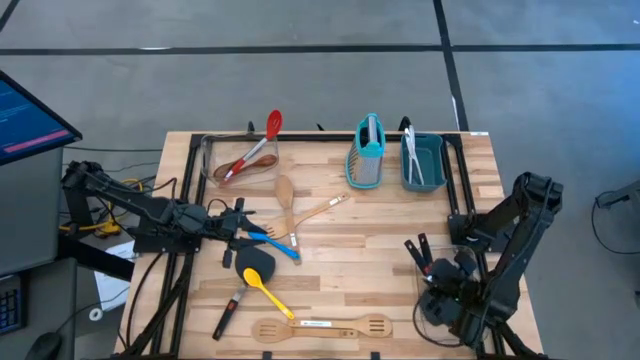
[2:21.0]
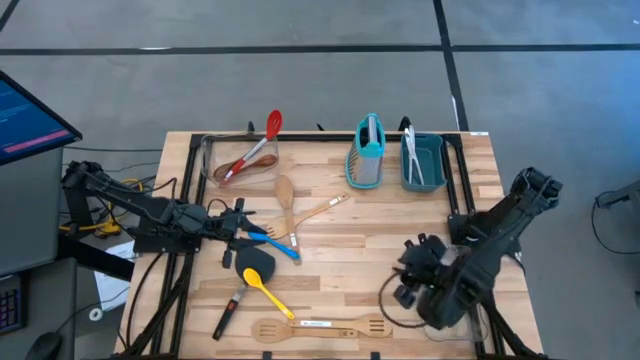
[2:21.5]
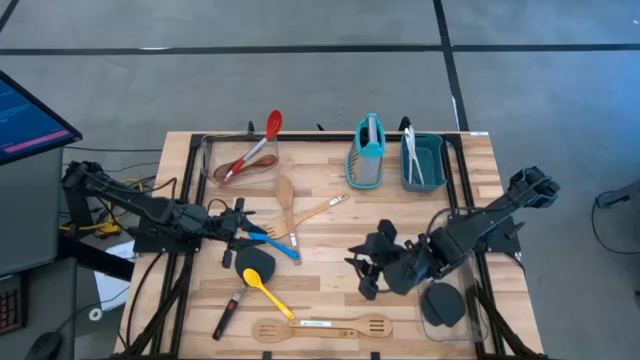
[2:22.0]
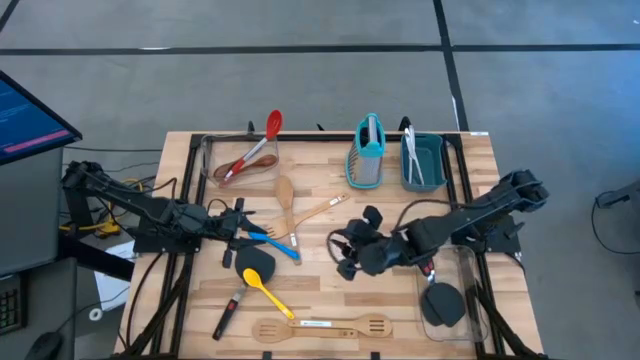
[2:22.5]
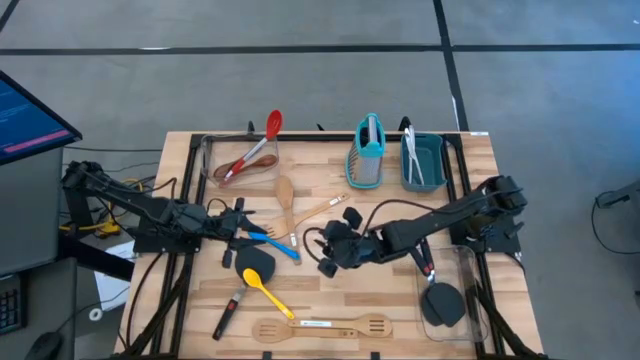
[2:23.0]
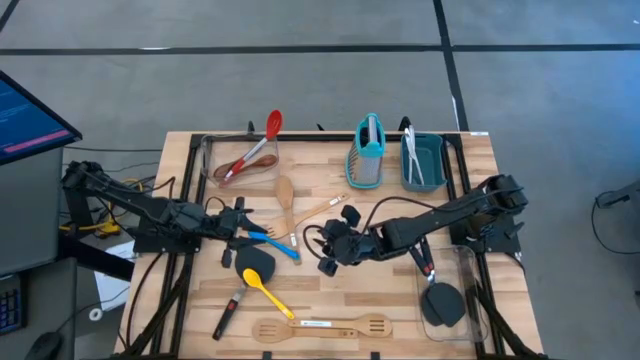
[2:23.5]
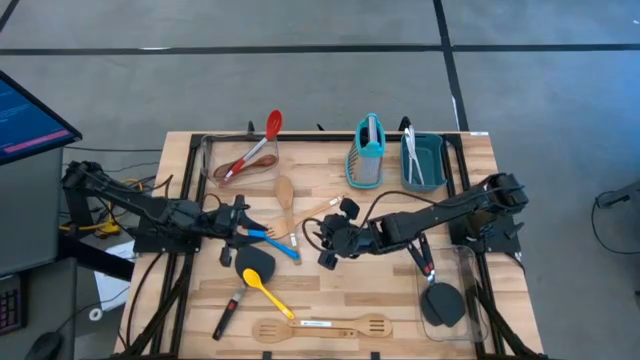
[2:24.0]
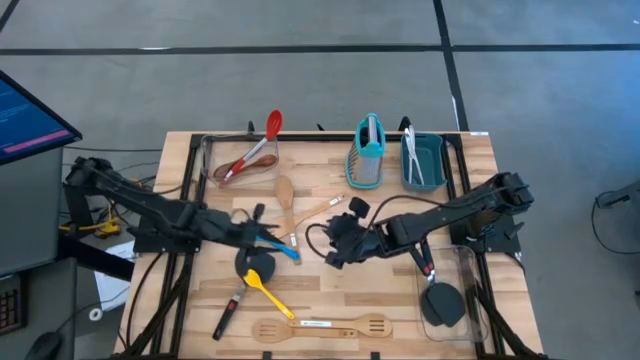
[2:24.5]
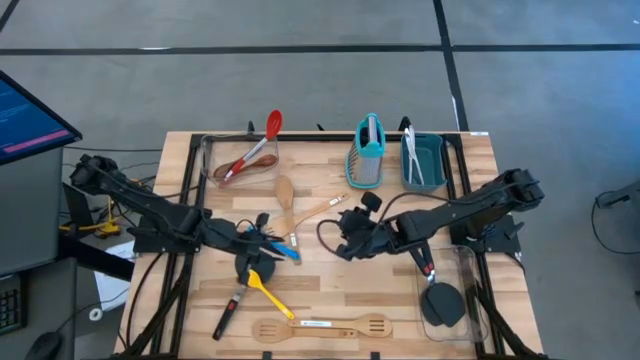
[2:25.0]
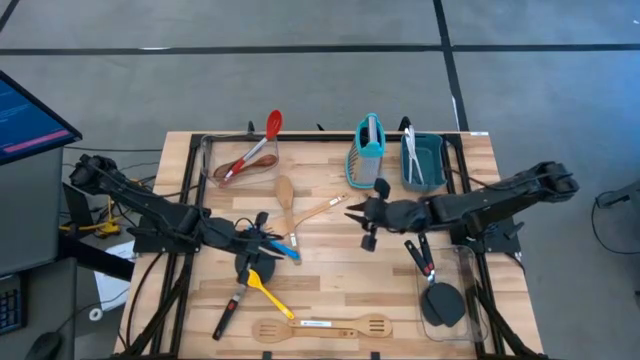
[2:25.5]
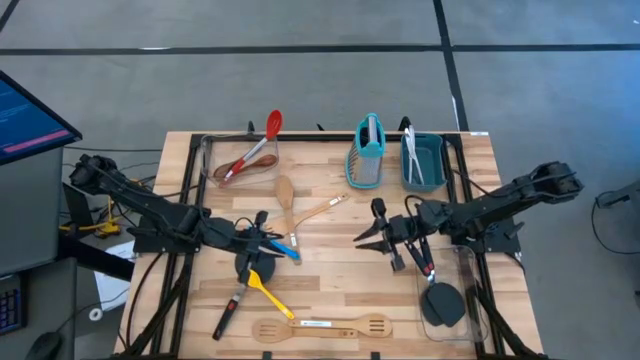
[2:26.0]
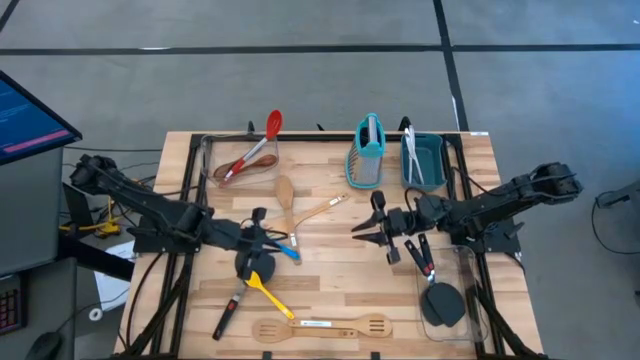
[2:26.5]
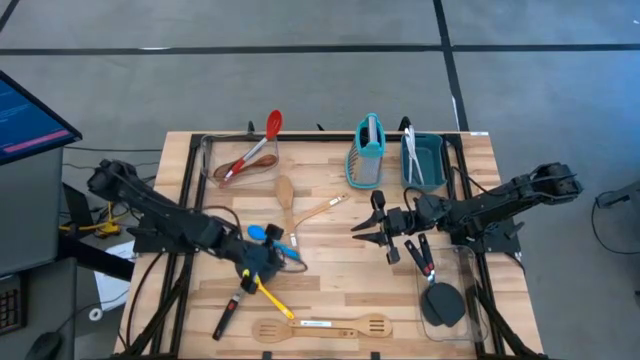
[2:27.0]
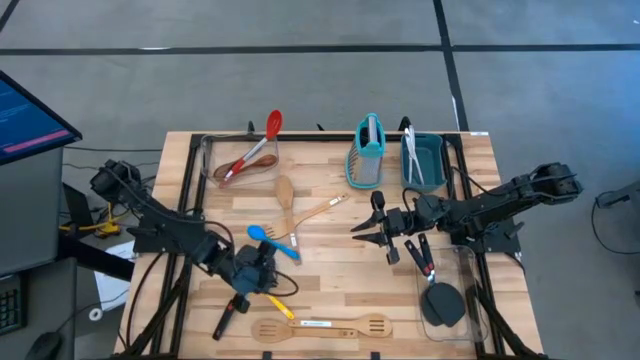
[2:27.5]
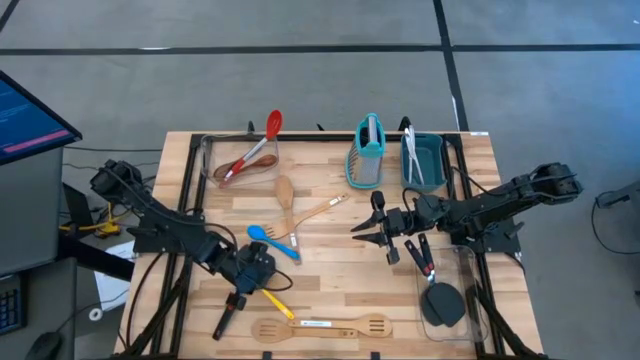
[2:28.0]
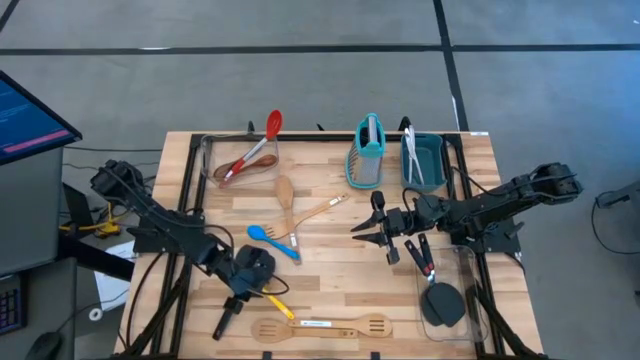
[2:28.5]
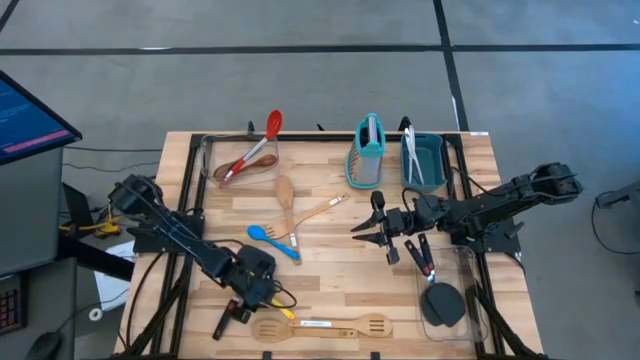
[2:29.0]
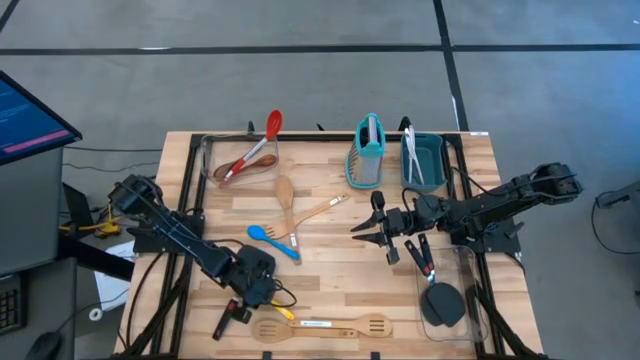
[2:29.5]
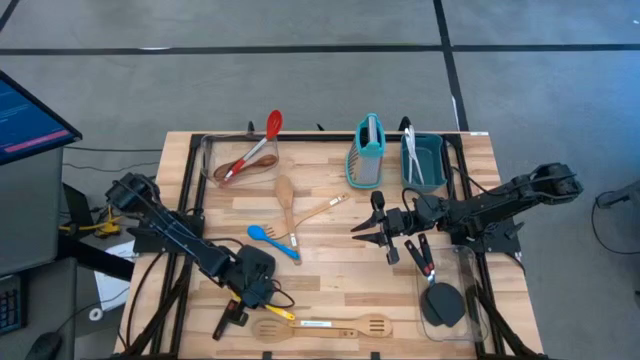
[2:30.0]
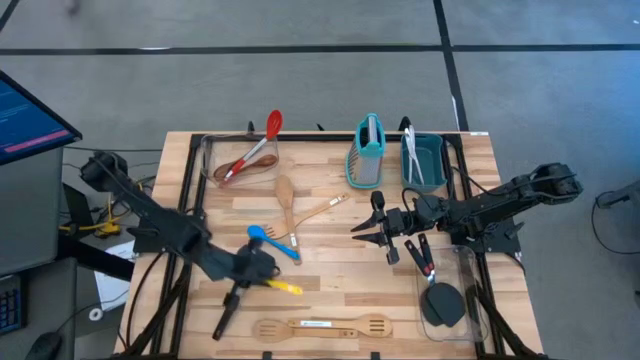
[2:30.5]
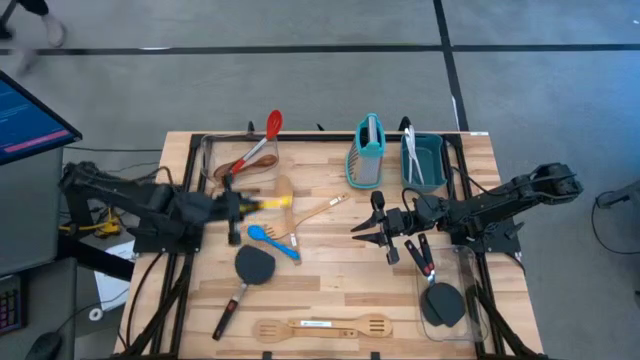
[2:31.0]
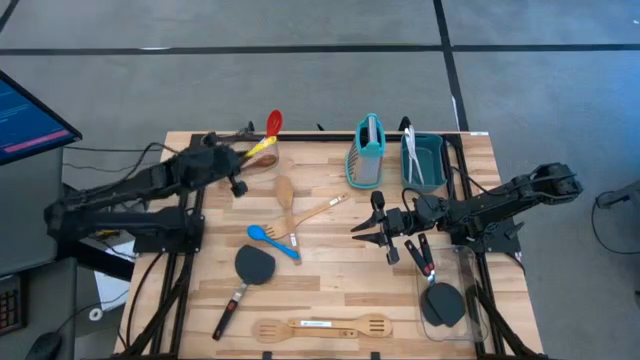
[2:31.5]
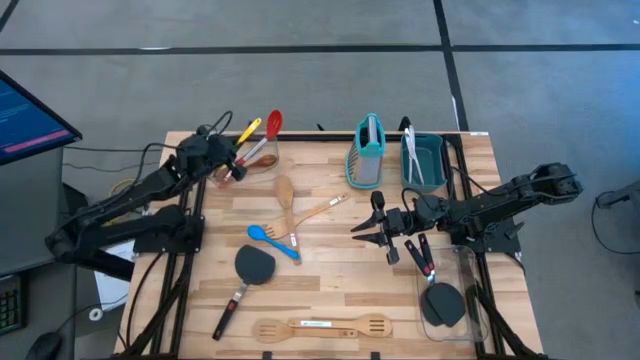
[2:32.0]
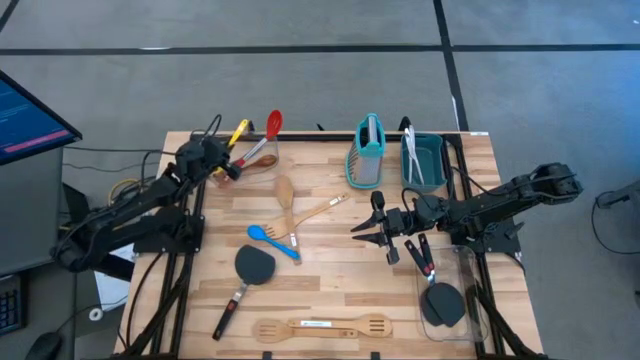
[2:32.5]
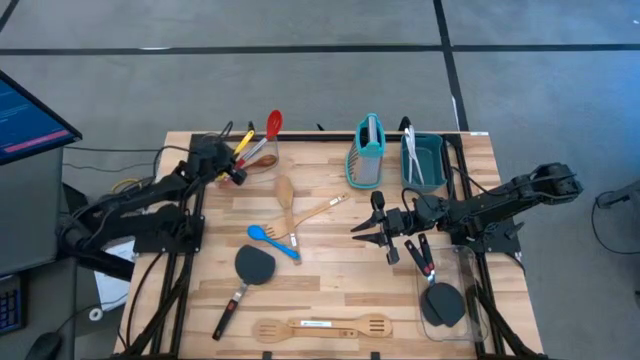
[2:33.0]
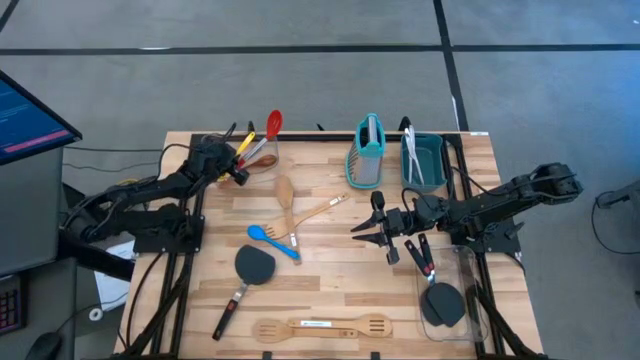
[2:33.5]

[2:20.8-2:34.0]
Task: Pick & Place Kitchen Items
Put the yellow spoon into the left transparent bin

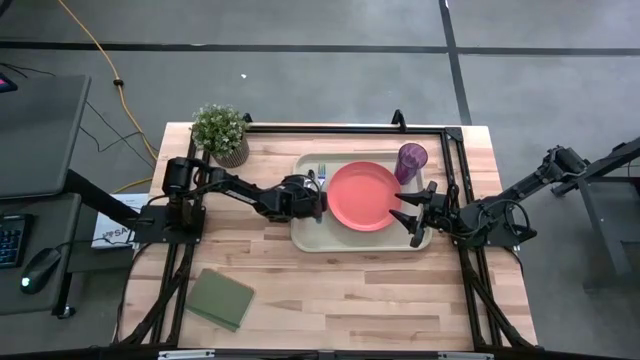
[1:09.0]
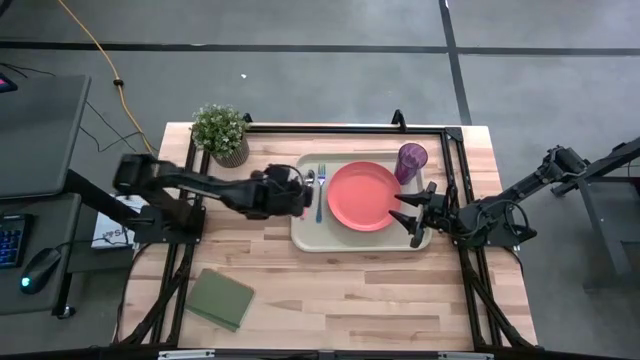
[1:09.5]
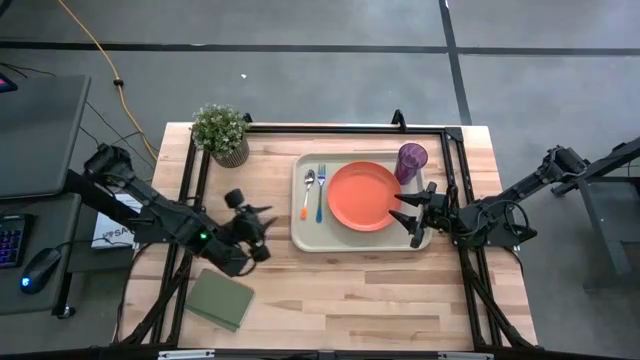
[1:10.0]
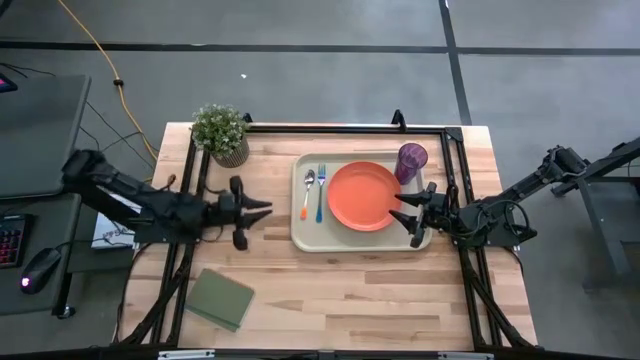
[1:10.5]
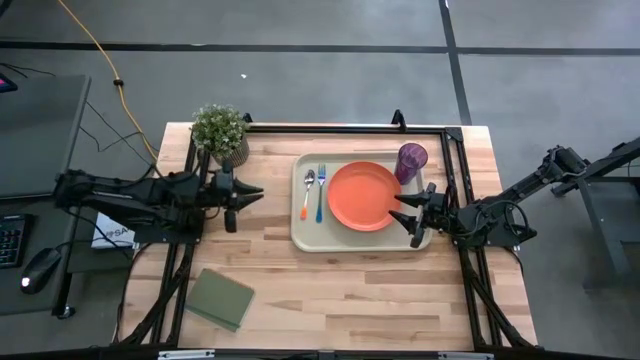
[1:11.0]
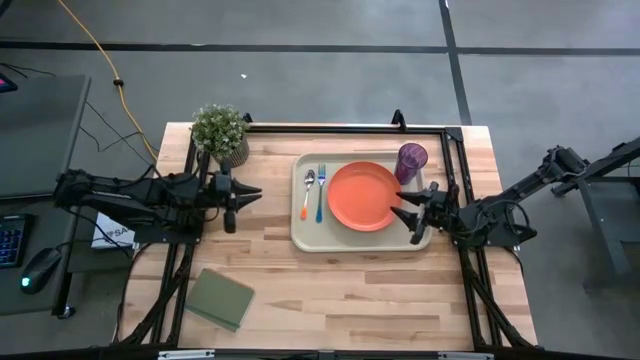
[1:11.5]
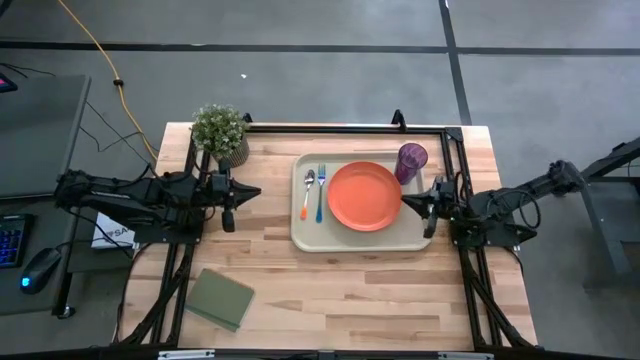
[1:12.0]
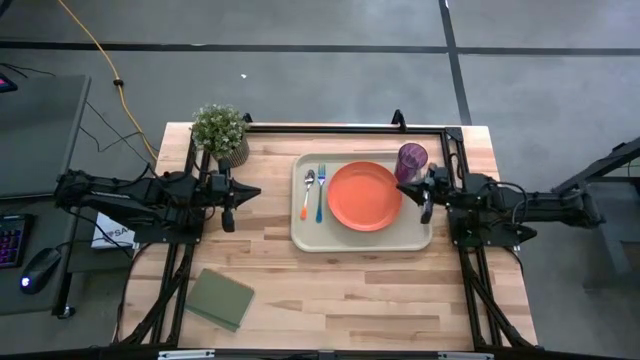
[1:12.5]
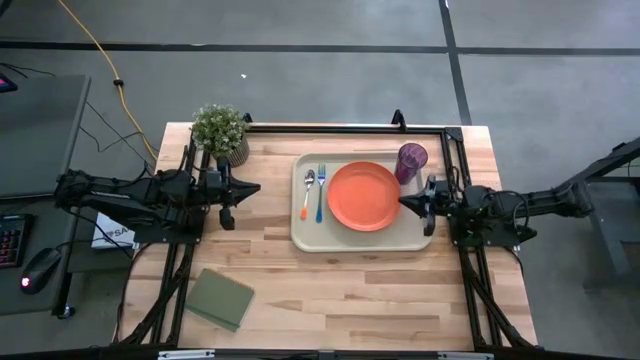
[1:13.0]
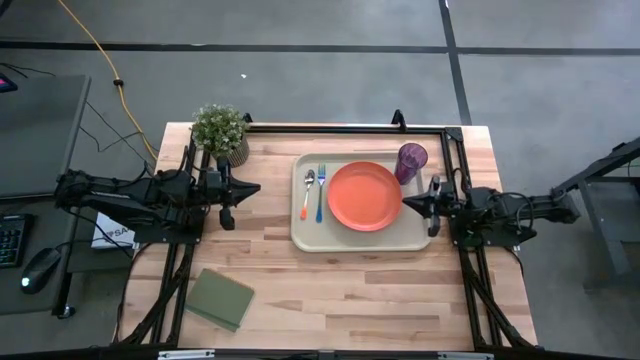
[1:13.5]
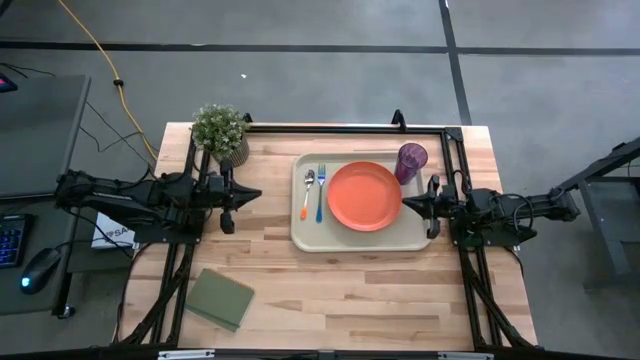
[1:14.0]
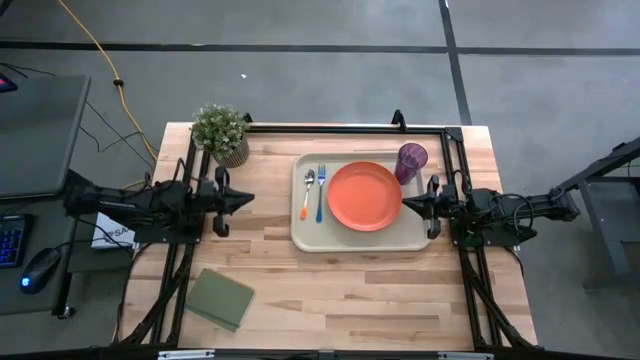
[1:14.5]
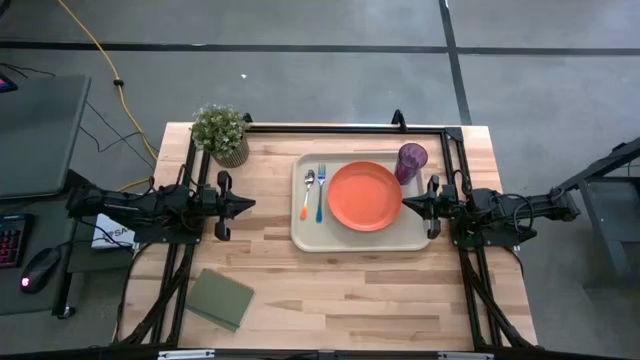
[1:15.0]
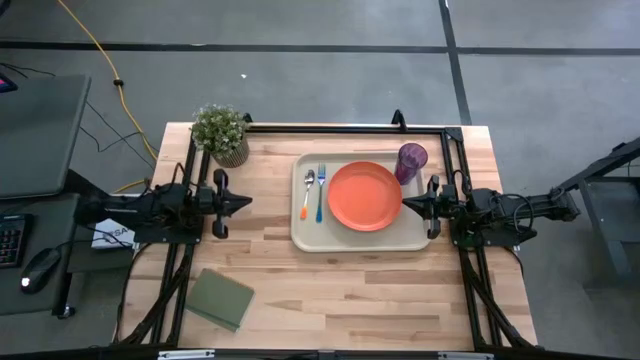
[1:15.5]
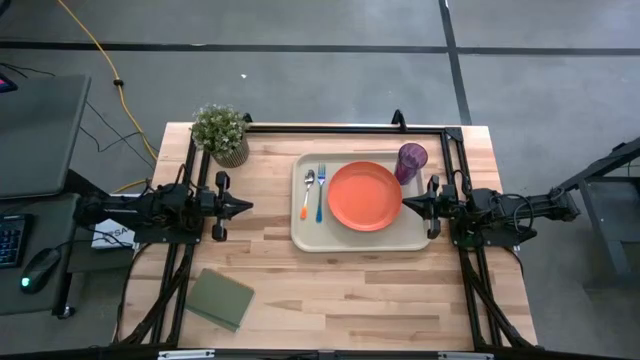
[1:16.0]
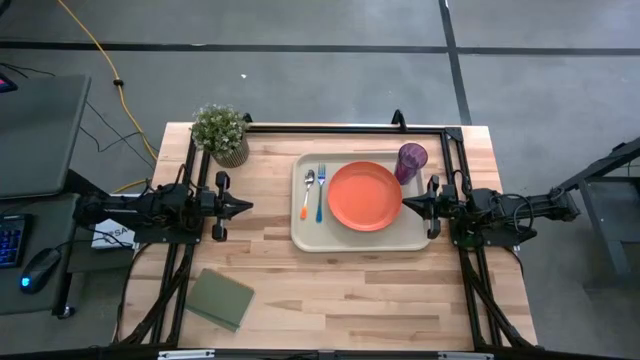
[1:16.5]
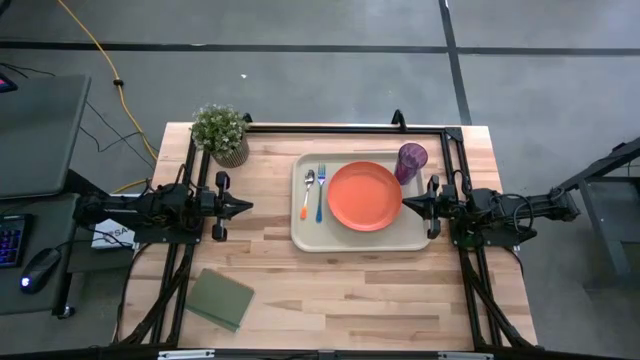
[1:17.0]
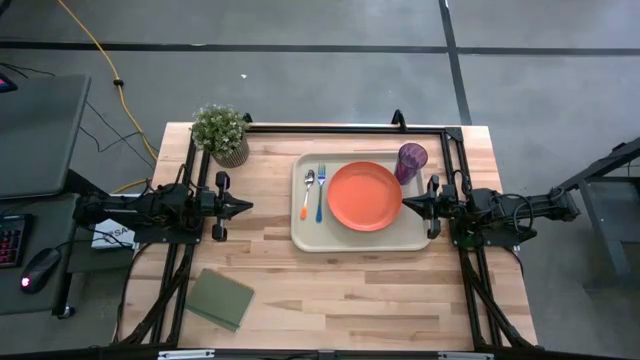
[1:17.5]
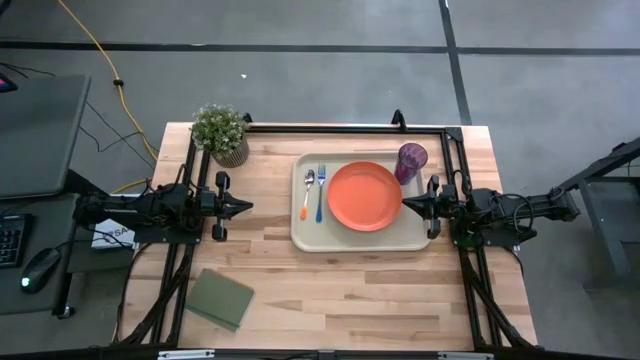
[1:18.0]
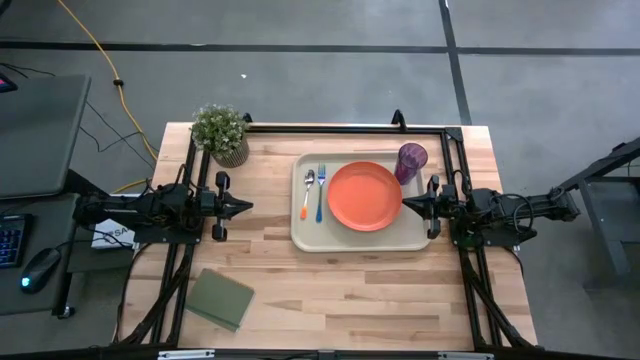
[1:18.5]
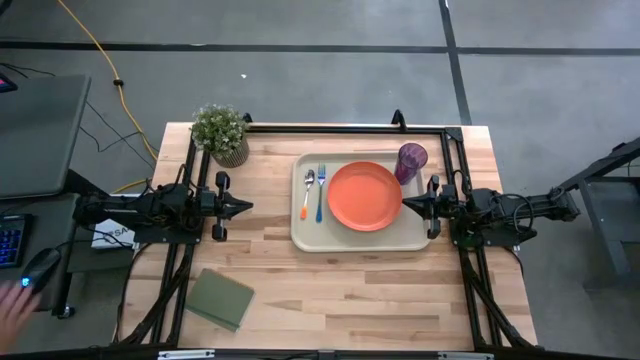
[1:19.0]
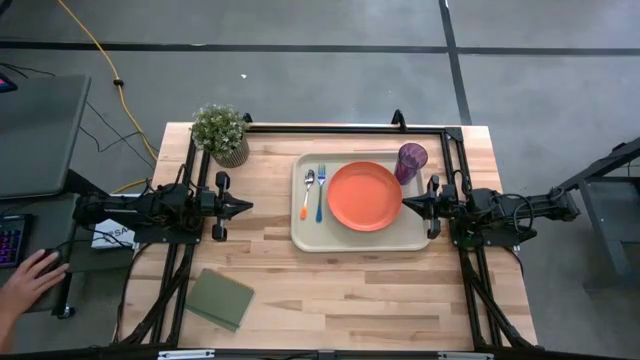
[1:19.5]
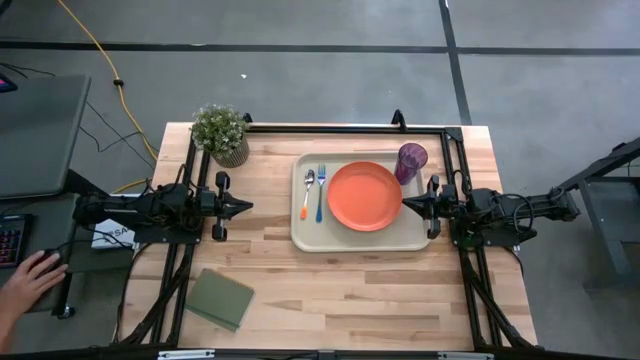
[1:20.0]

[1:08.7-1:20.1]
Task: Pick and place plate/cup/fork/spoon on tray
Return to Home Position
